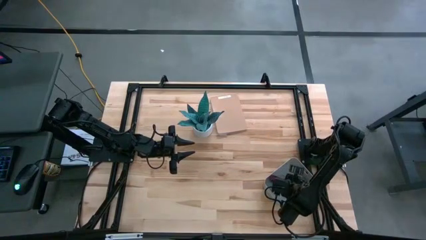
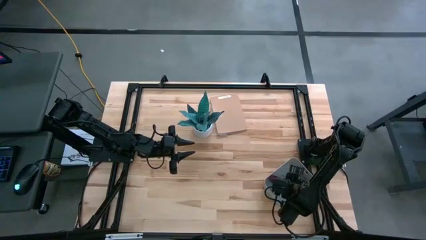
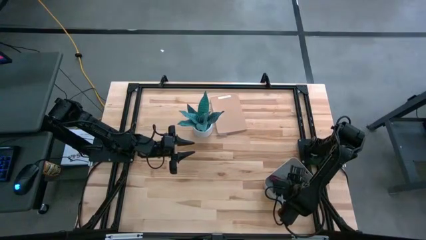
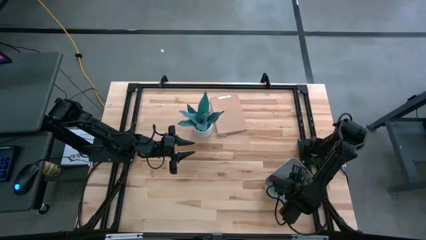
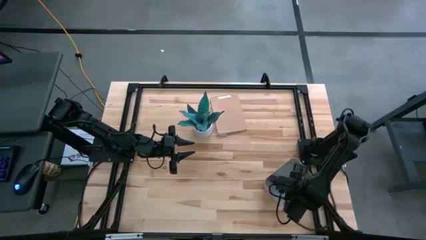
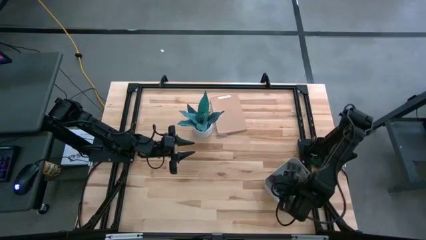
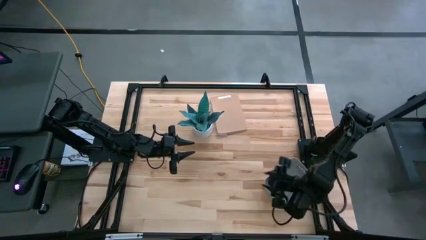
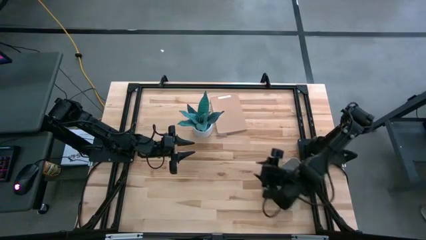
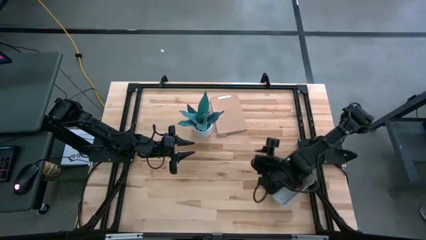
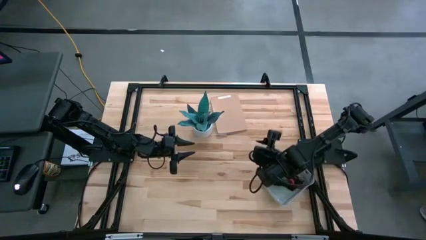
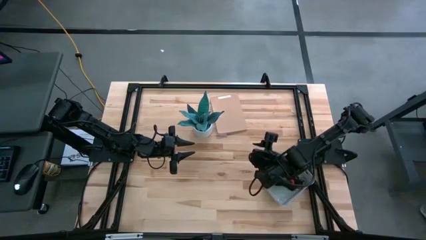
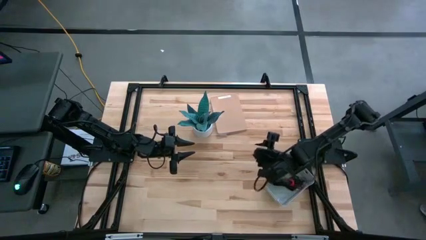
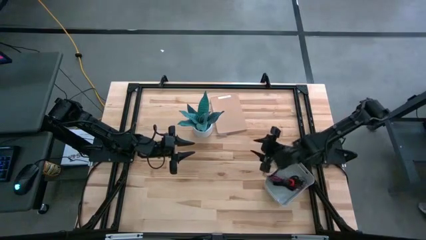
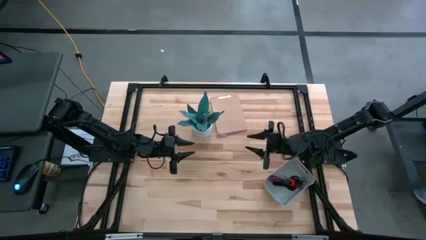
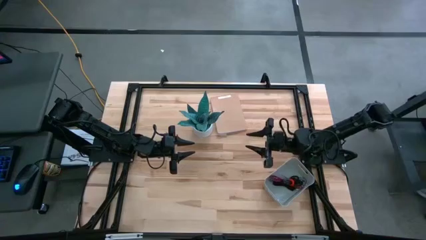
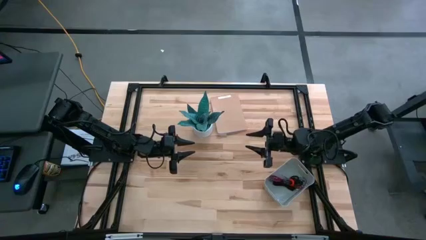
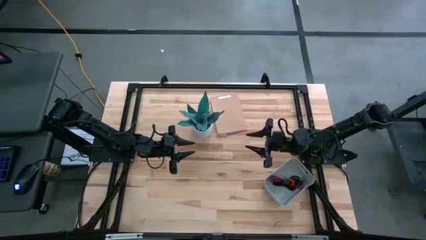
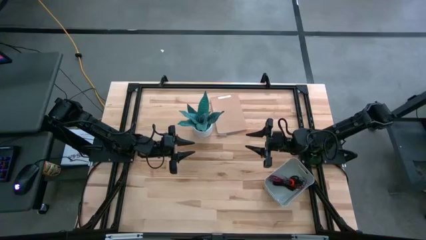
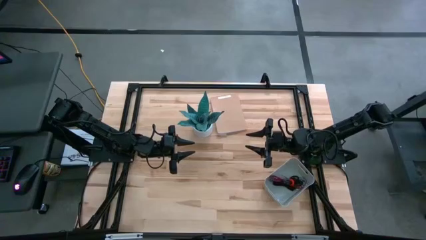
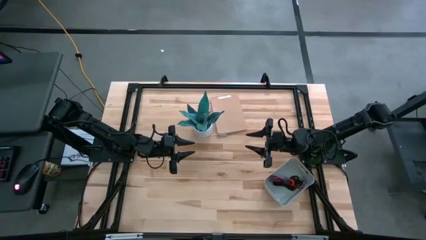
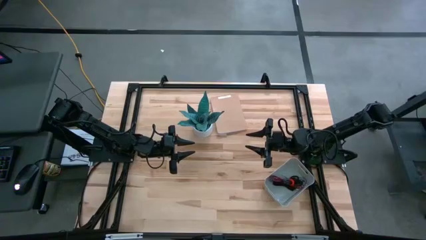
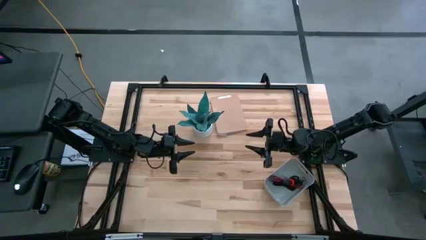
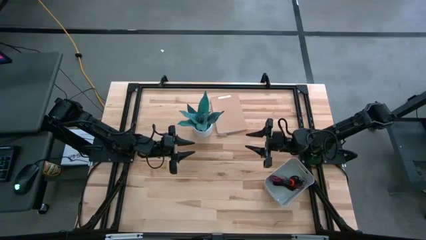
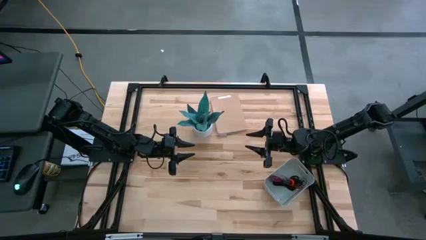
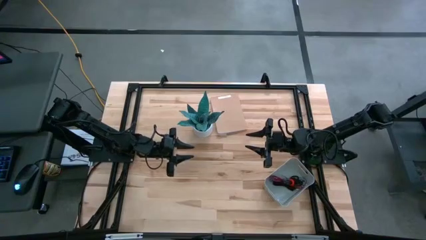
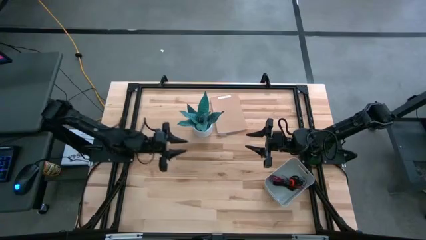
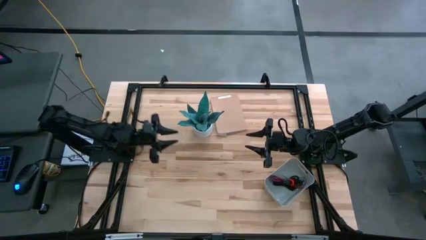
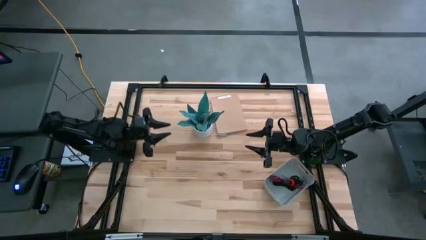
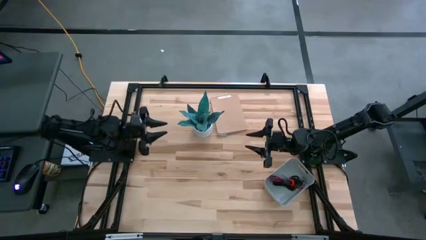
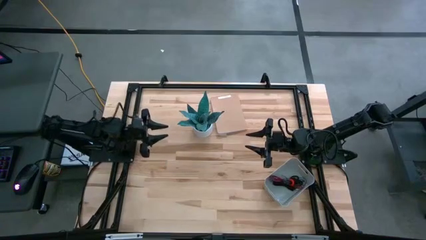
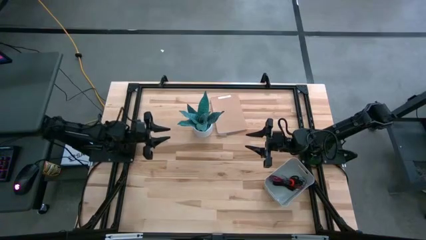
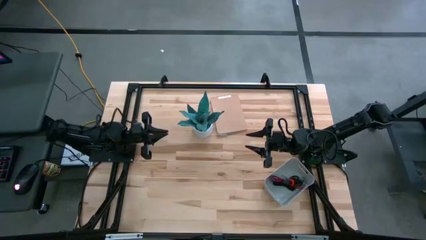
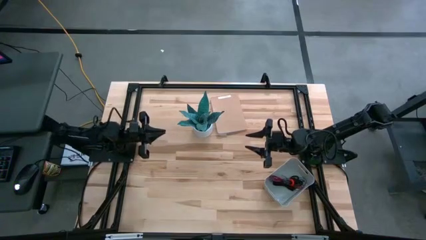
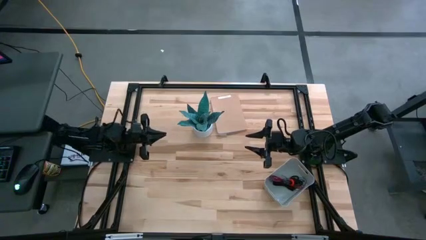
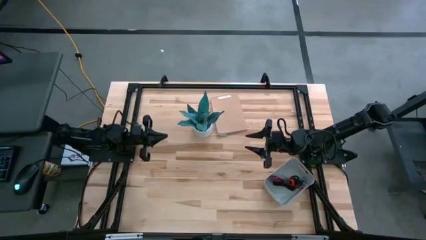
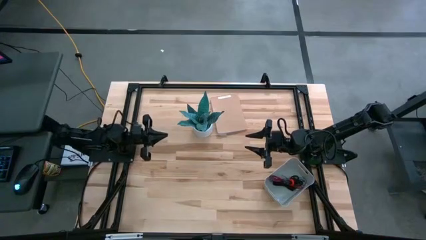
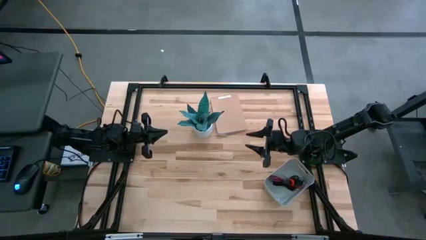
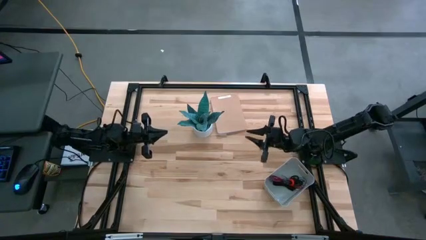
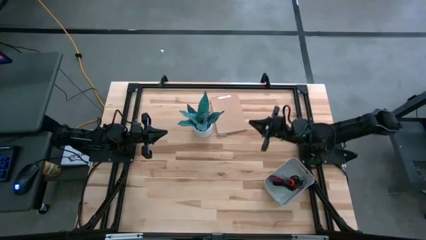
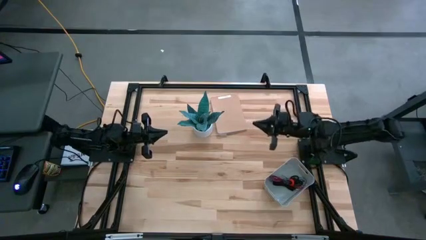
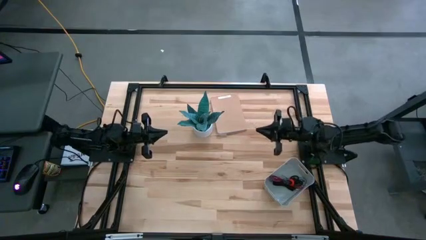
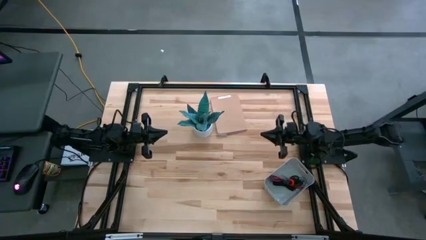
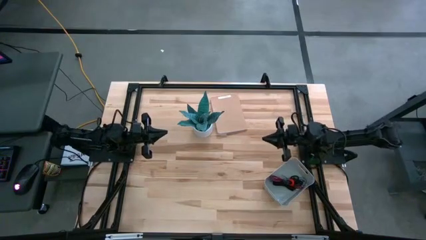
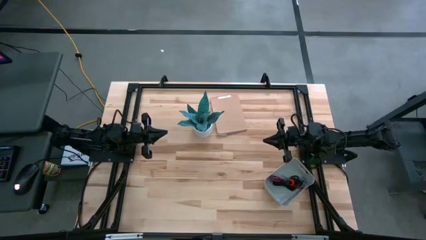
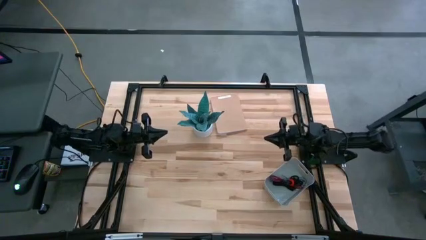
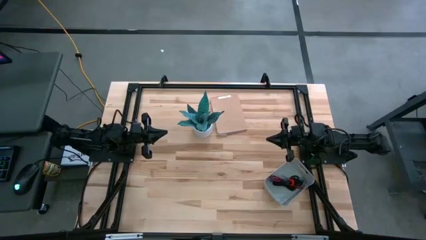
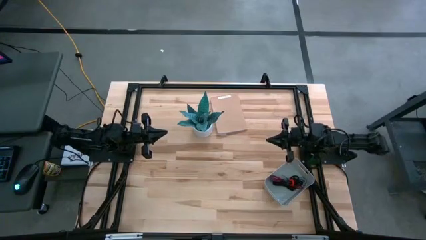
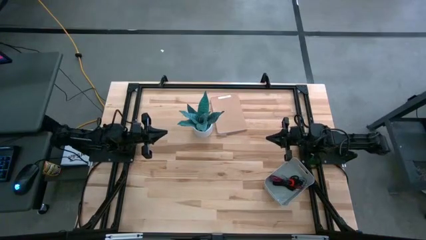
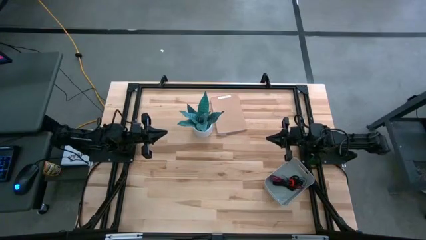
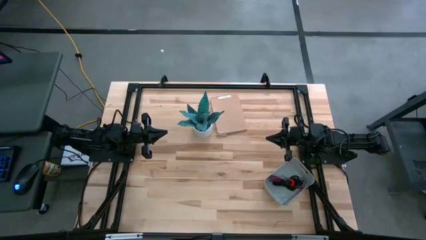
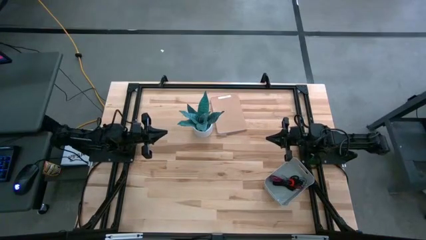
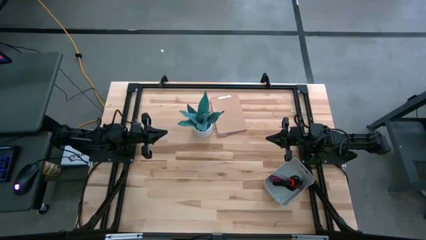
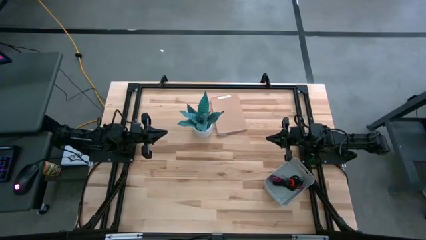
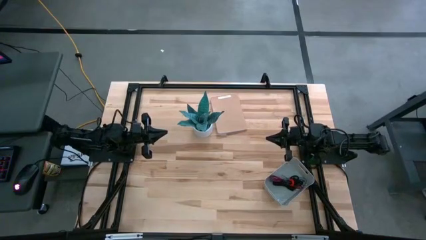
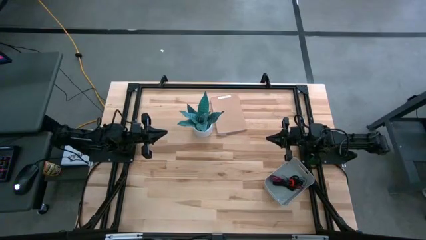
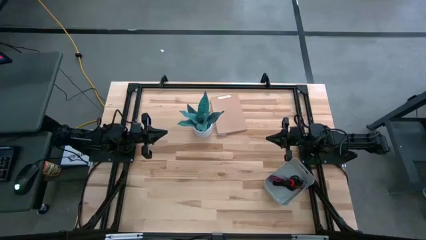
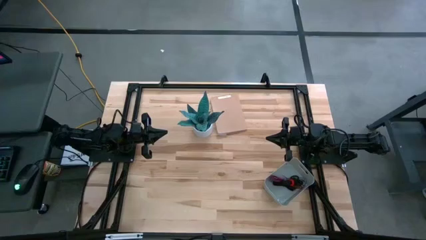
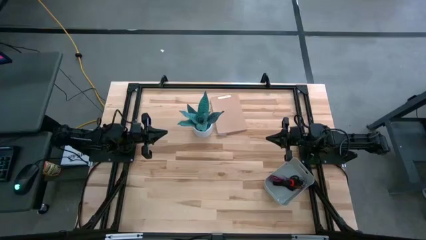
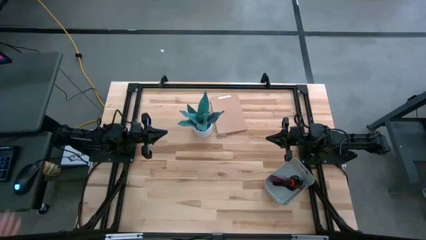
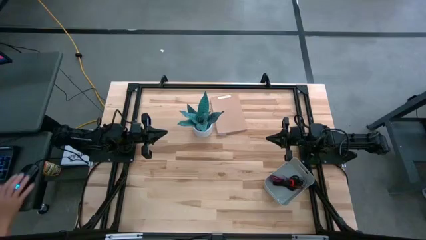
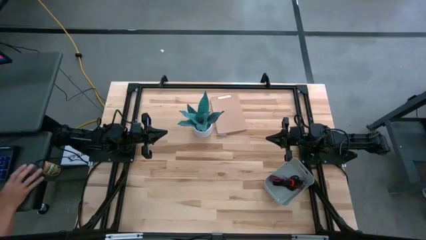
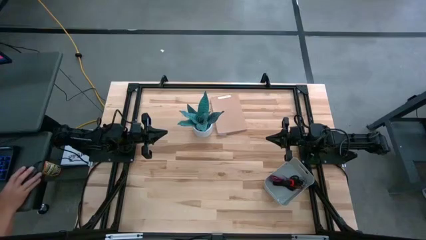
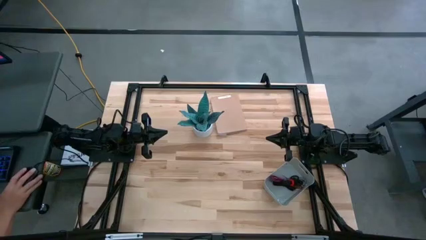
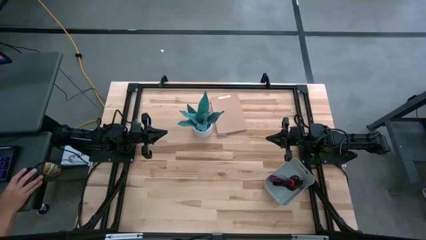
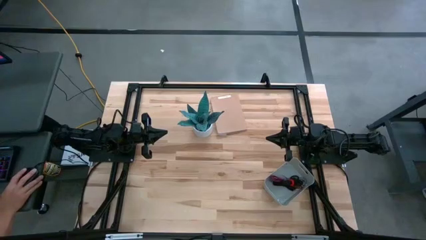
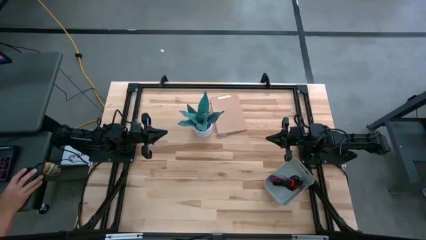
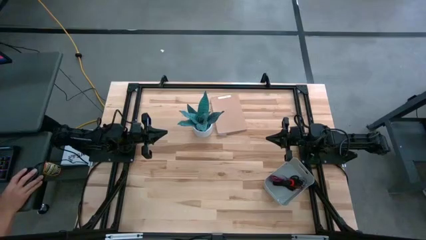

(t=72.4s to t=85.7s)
Task: Pick and place USB-C Cables
Return to Home Position

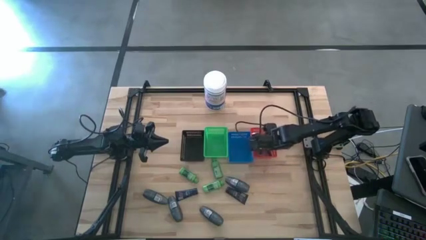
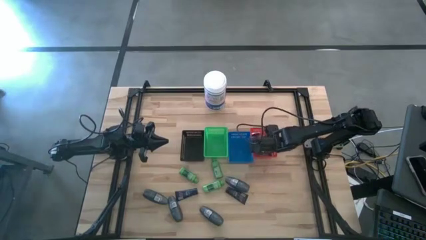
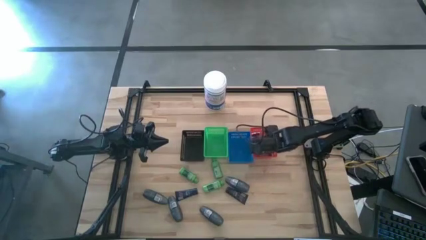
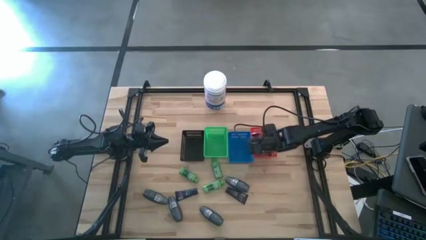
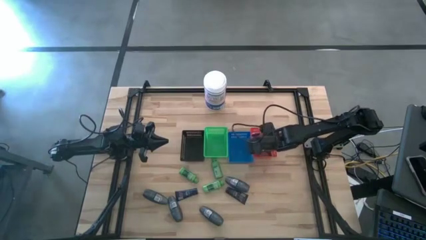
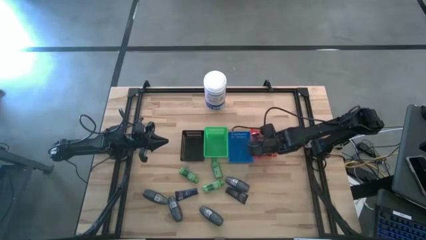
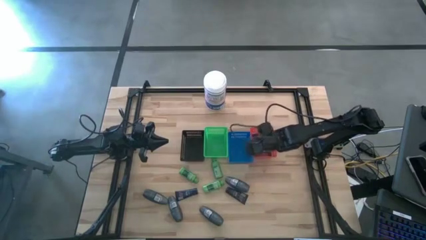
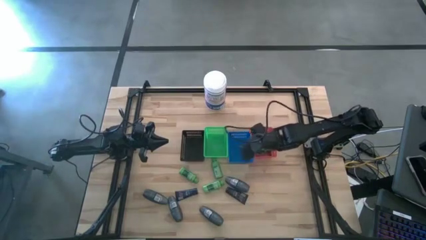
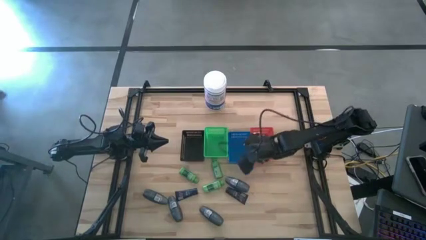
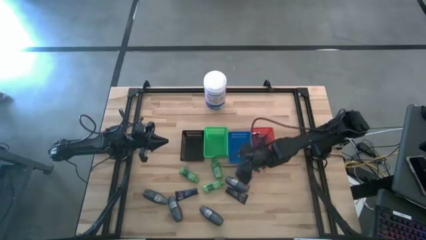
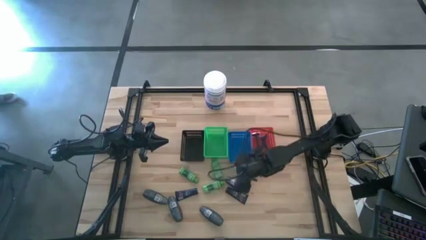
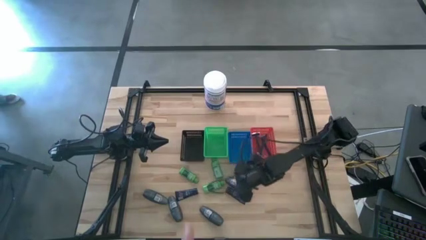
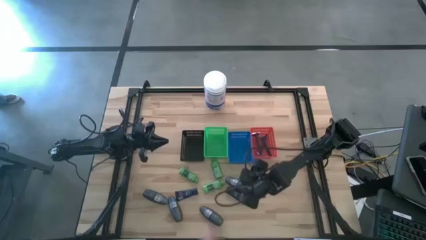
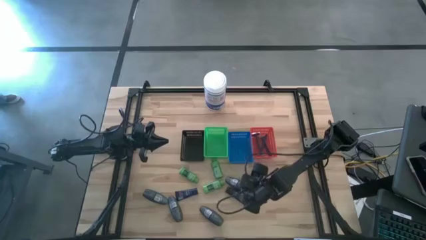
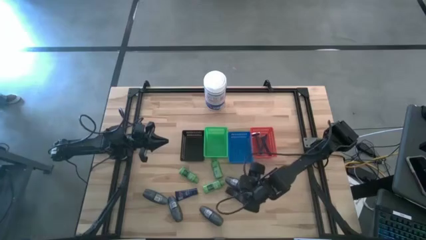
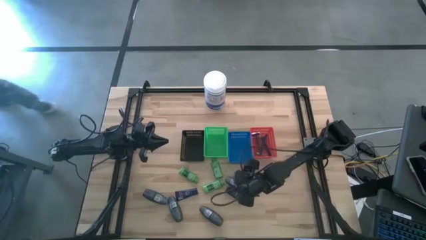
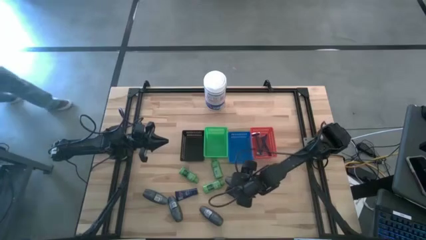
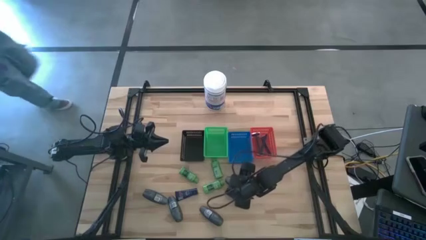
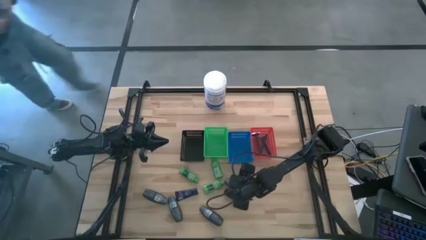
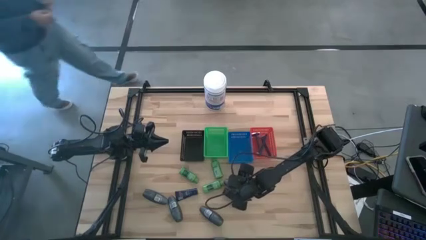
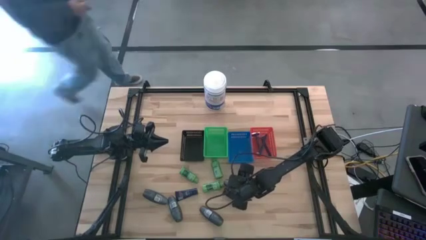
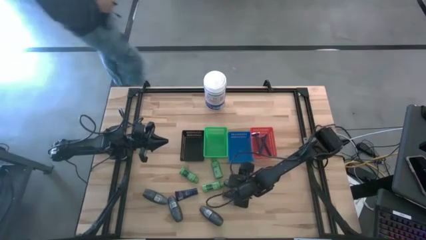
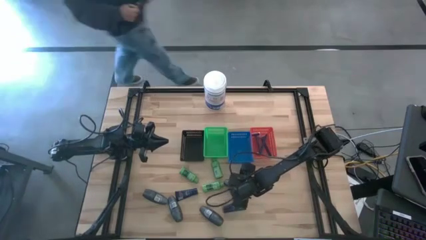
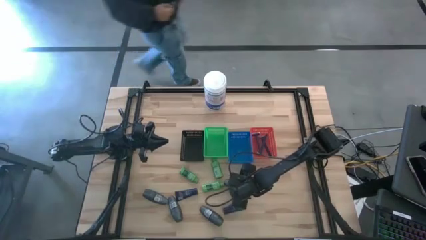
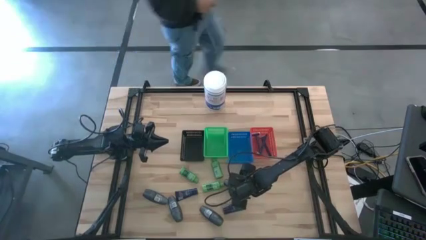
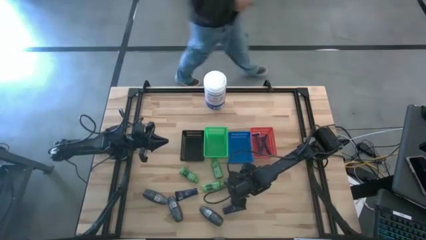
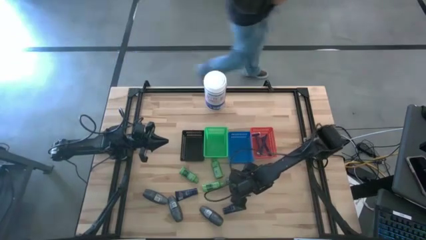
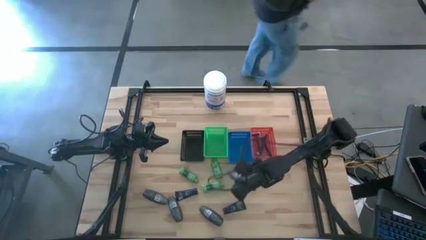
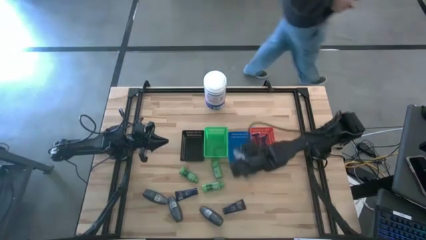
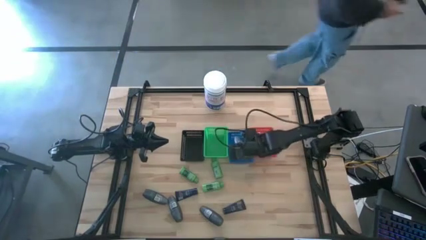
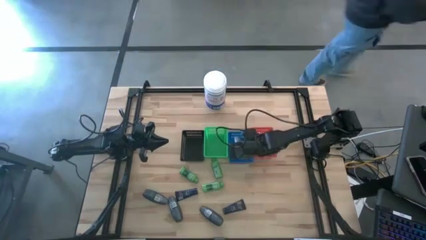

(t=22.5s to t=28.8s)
Task: Pick & Place Travel size toiletries
Put the deodorant into the blue basket
